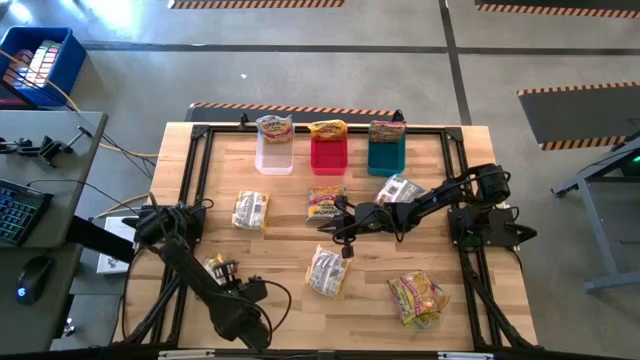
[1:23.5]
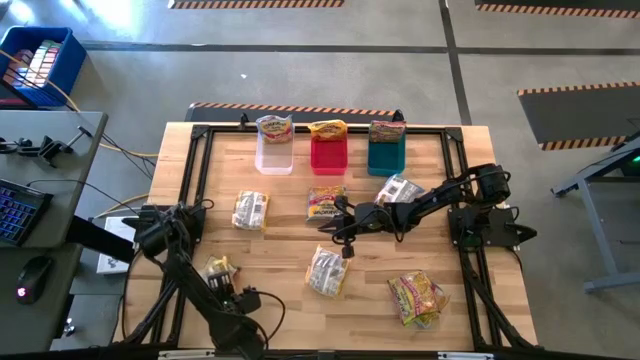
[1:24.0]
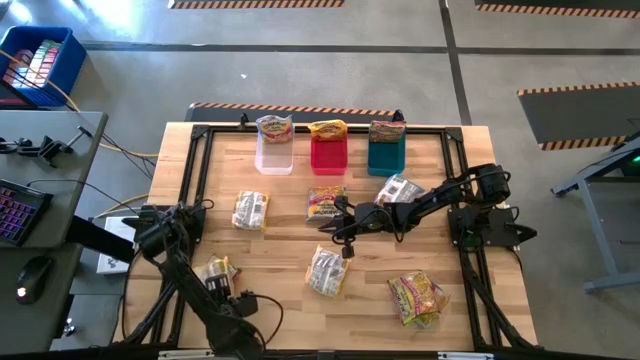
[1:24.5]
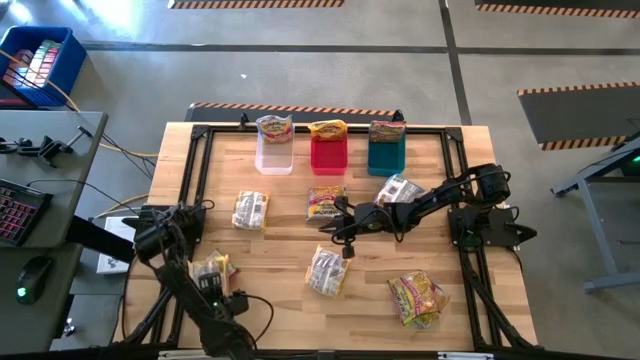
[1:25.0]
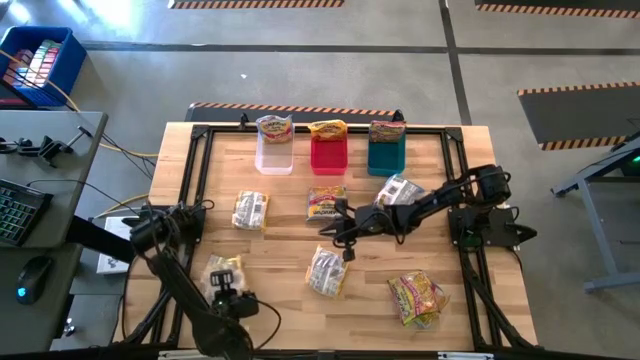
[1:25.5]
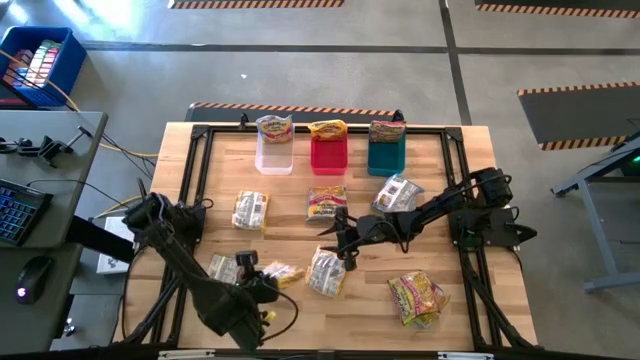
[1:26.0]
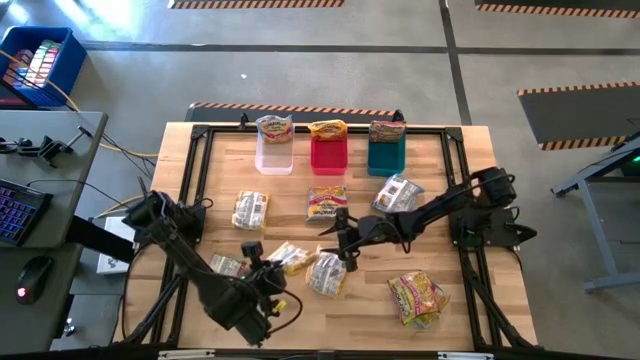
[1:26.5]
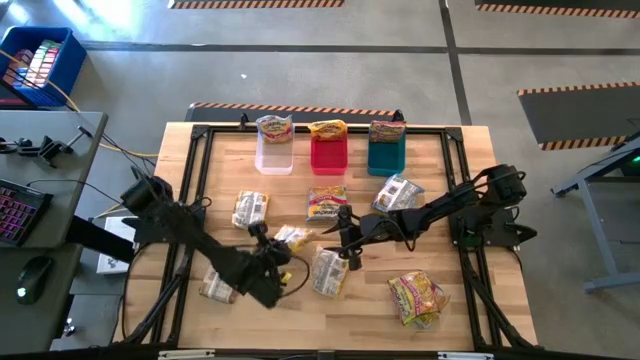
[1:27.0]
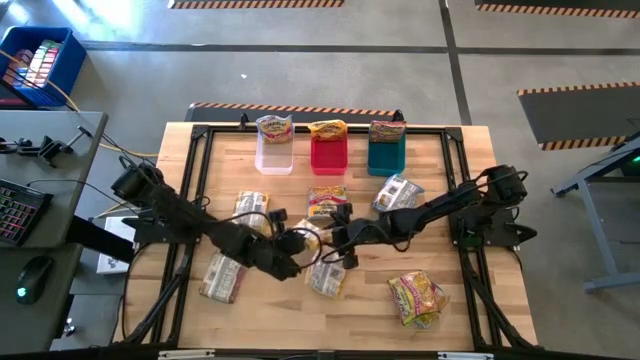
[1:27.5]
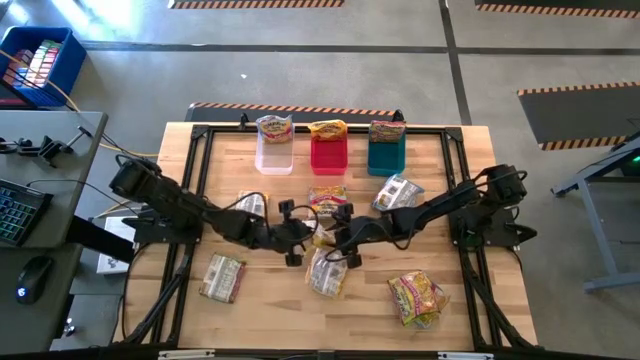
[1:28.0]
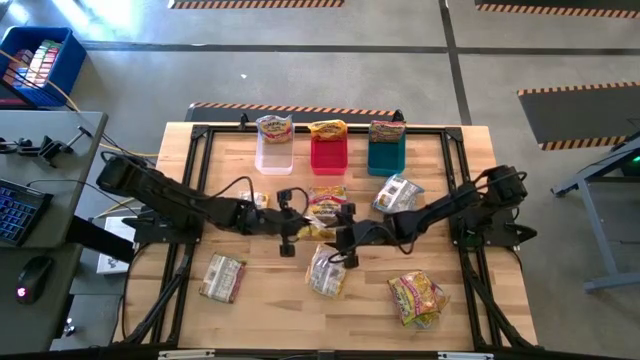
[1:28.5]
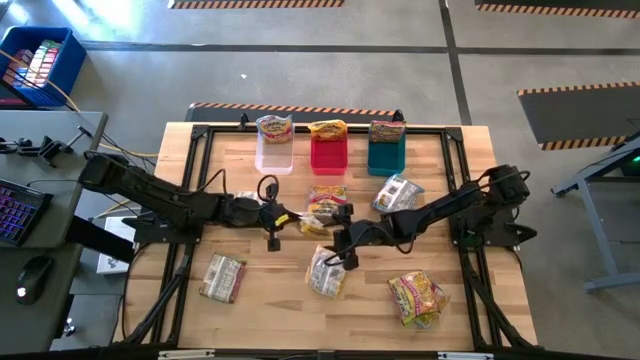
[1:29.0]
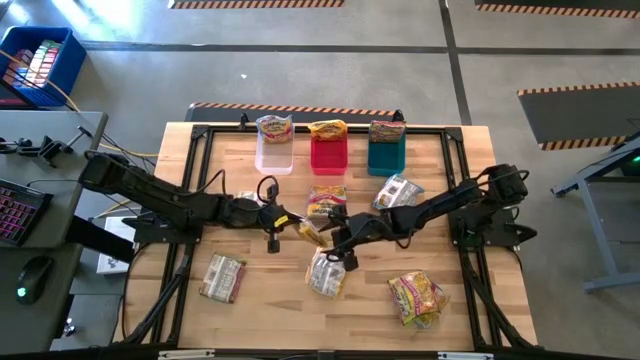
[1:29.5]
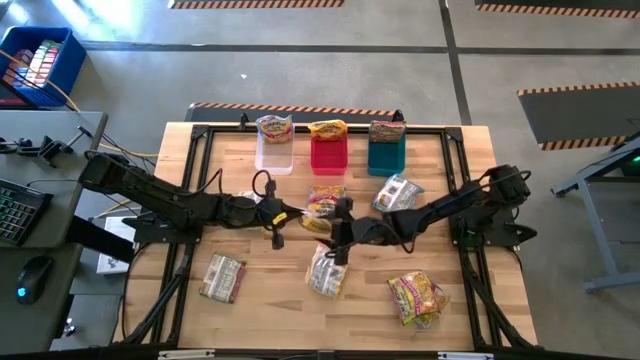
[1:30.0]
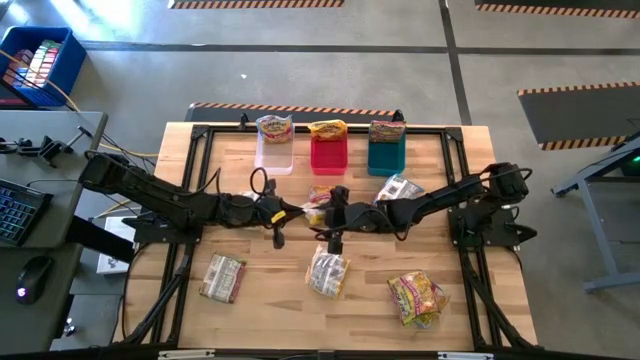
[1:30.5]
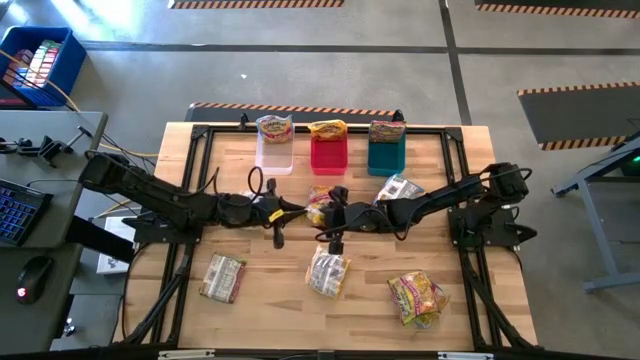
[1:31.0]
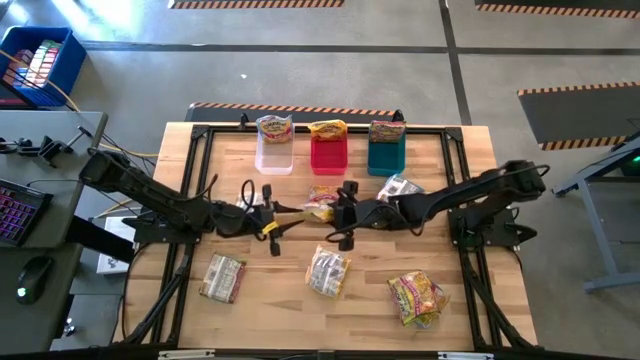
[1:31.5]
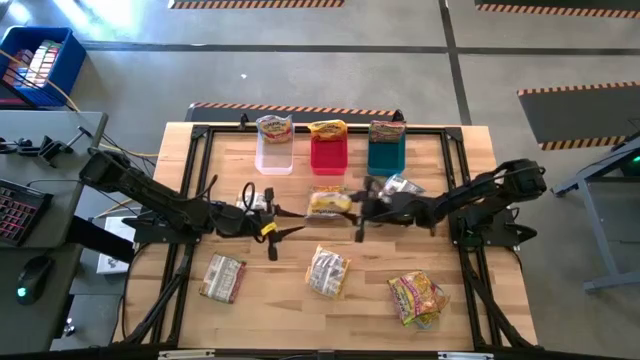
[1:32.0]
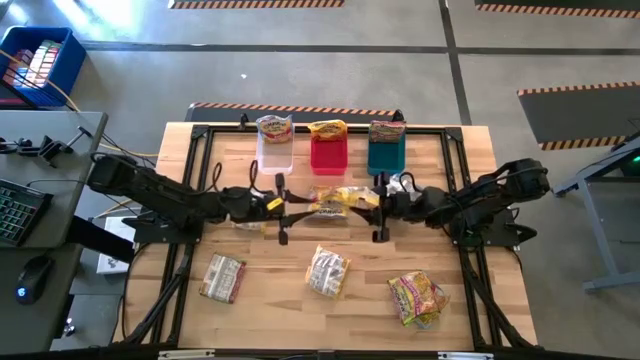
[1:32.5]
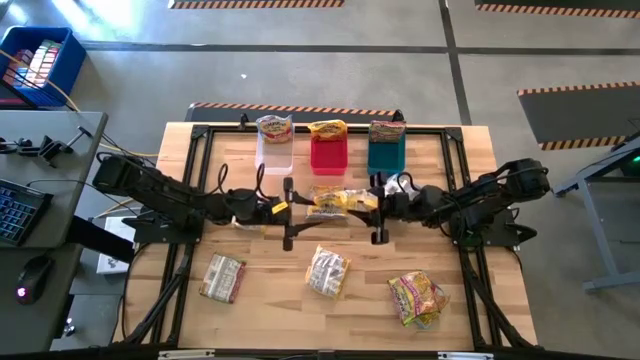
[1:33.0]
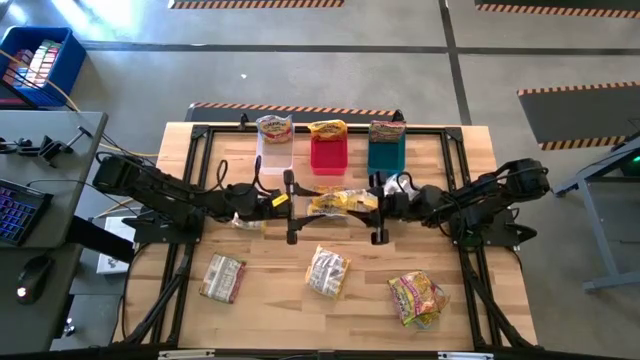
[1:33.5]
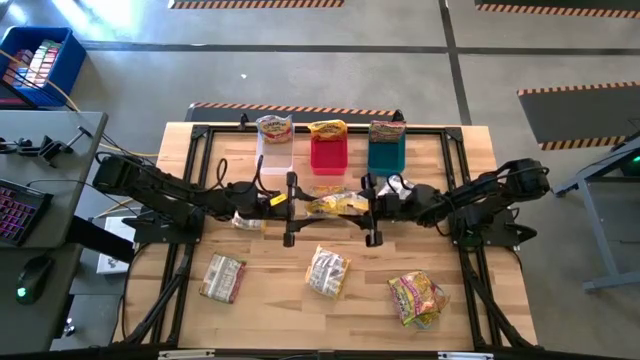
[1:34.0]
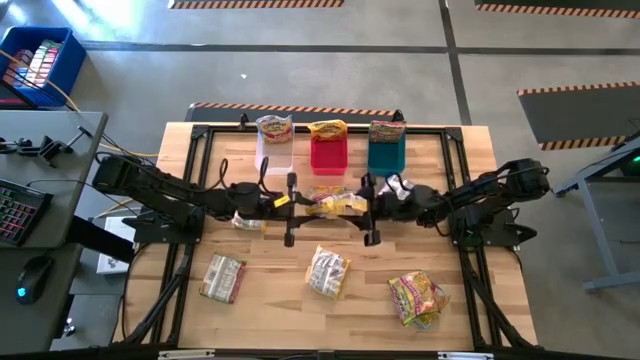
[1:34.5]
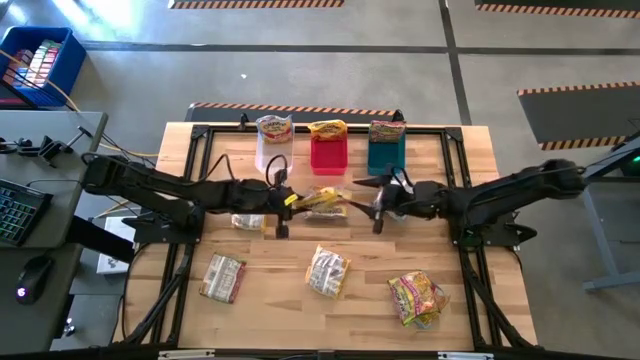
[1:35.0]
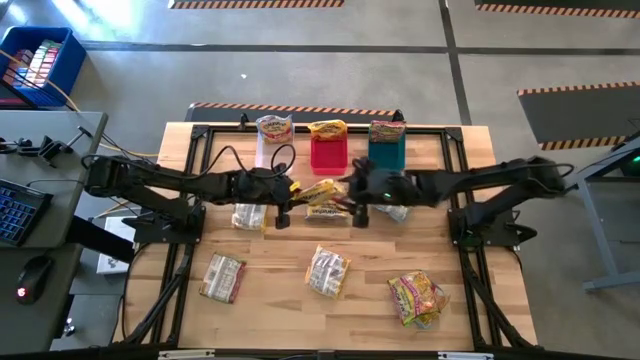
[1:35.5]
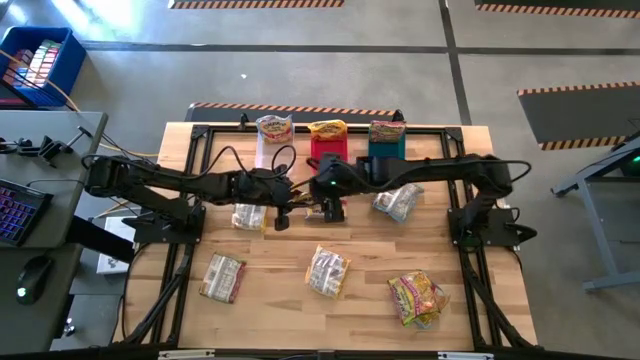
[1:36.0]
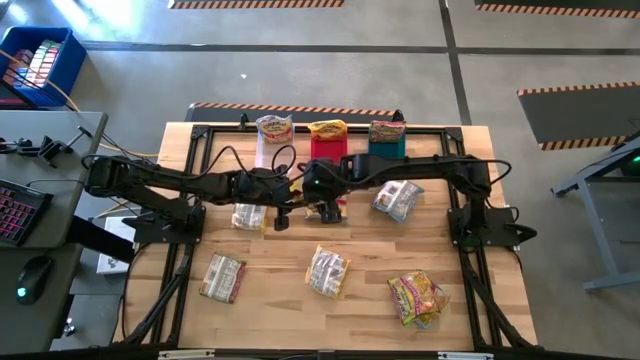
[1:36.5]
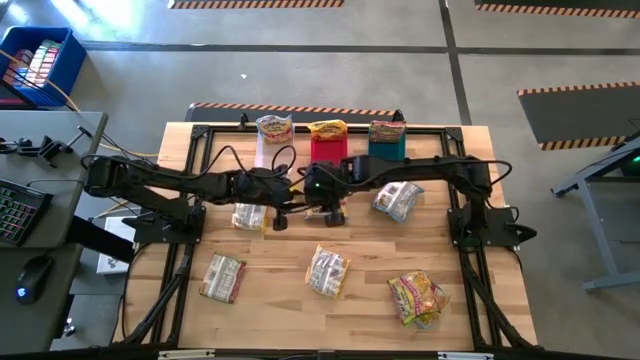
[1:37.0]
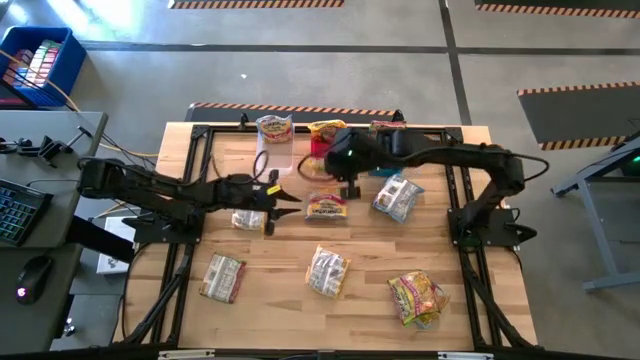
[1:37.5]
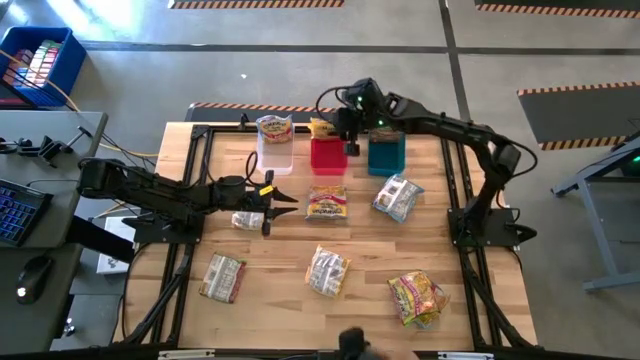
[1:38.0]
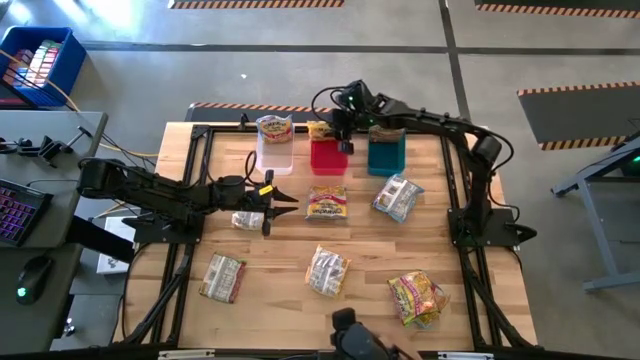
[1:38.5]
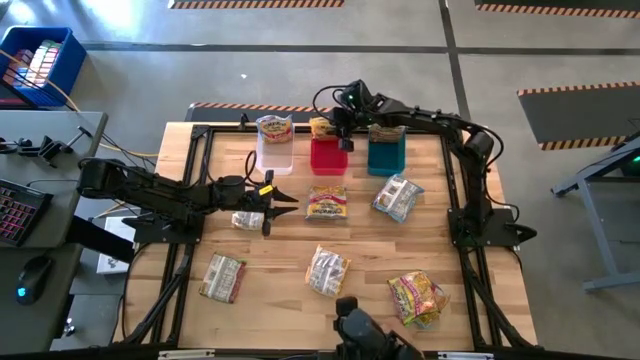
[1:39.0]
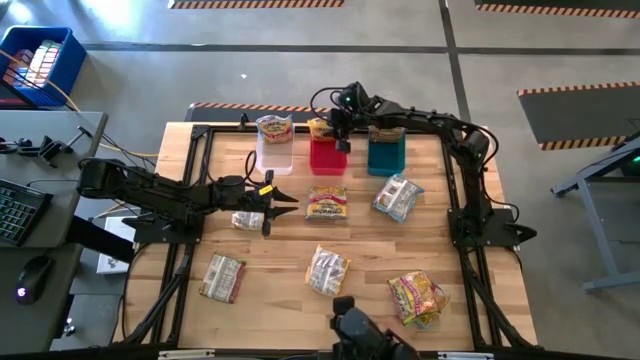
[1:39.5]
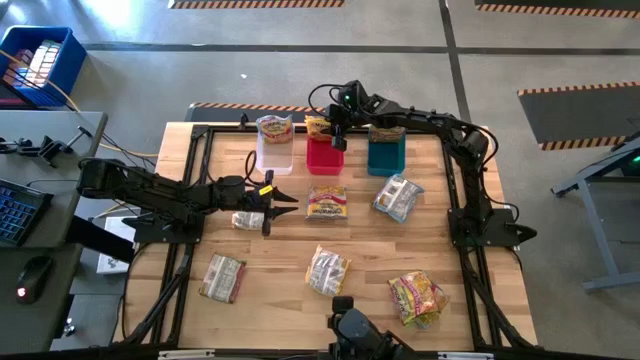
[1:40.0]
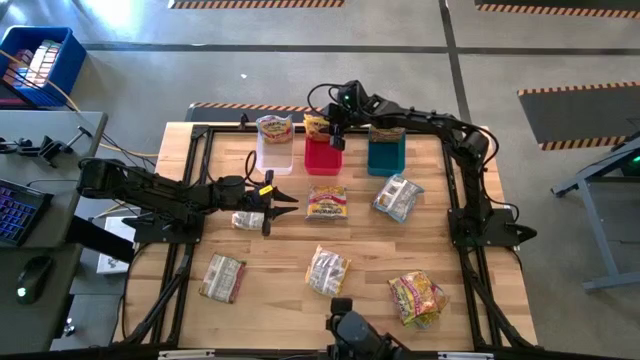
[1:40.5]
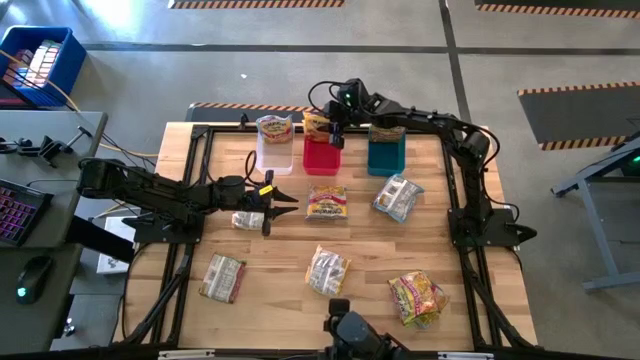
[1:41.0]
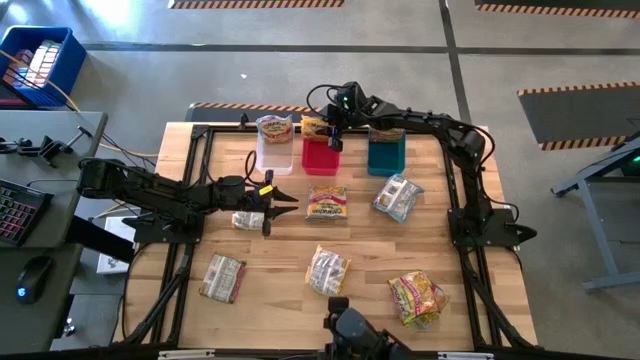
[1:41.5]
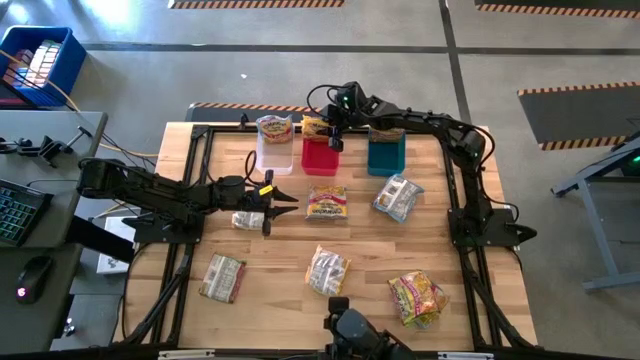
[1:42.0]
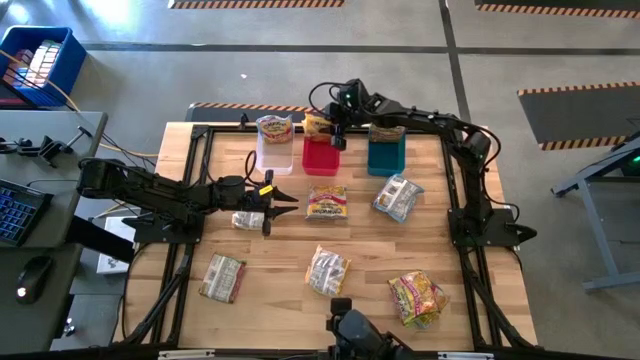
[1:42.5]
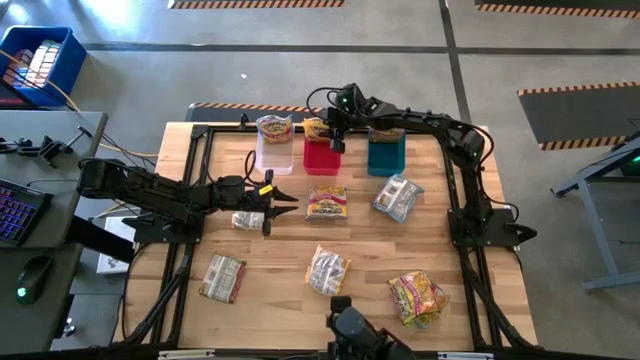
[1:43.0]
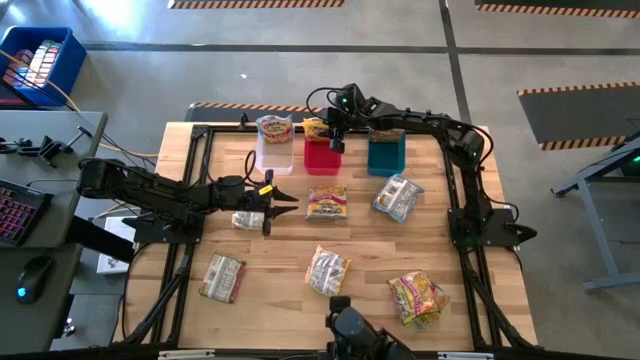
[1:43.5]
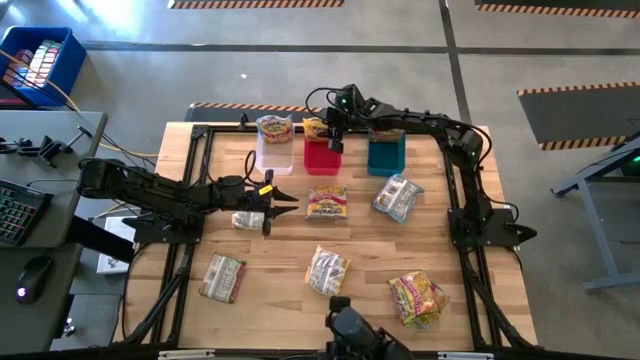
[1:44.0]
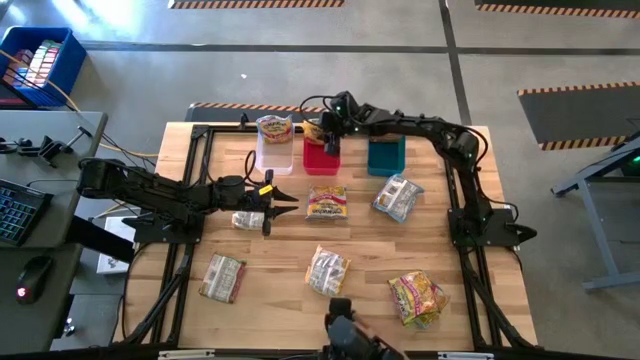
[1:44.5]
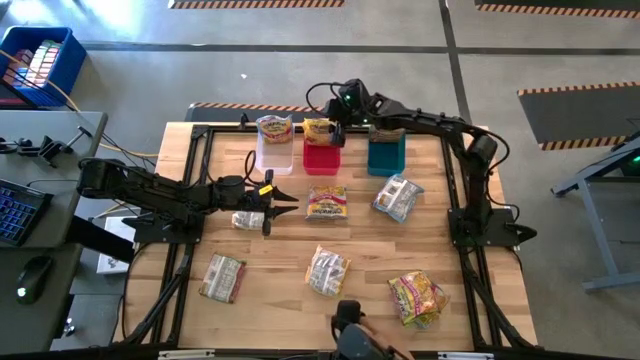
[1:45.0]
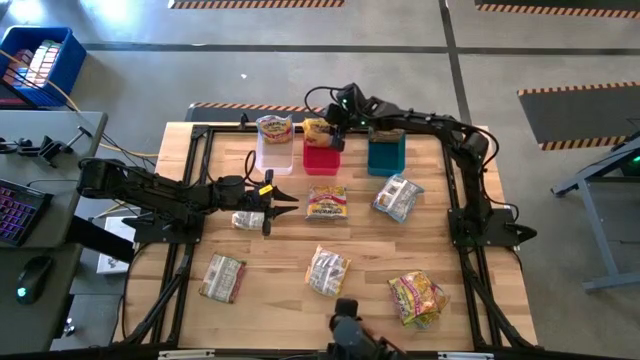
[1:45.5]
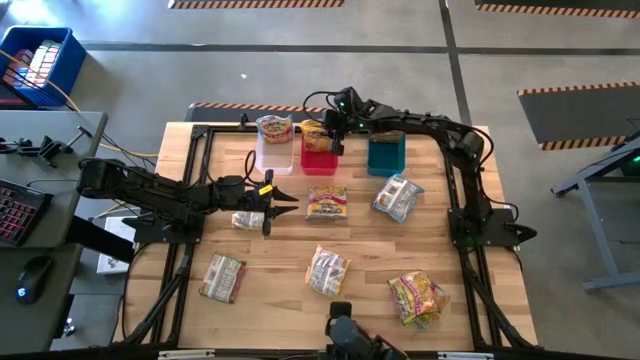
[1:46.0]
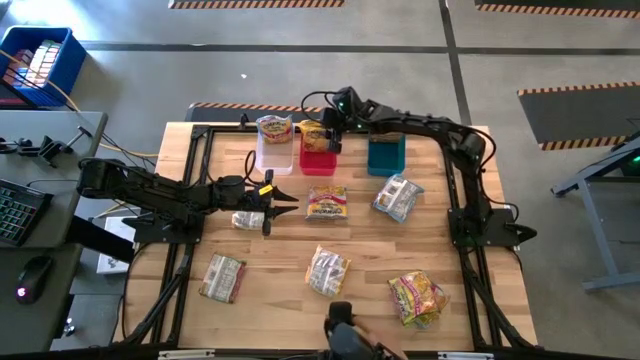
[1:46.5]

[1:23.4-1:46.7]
Task: Sort Maruchan noodles
Put the yellow noodle pack into the red bin
